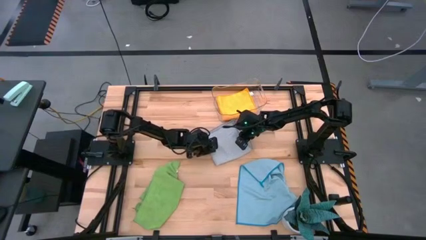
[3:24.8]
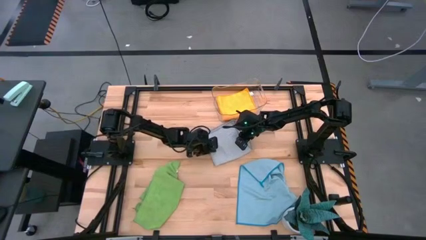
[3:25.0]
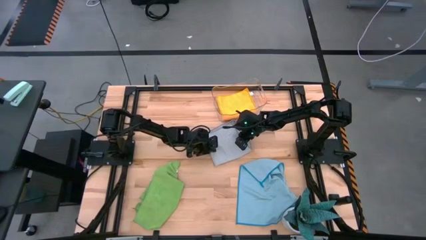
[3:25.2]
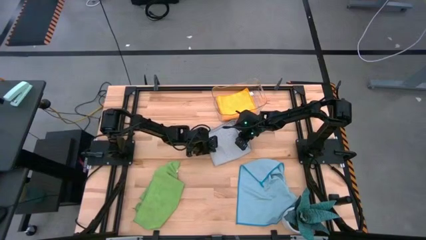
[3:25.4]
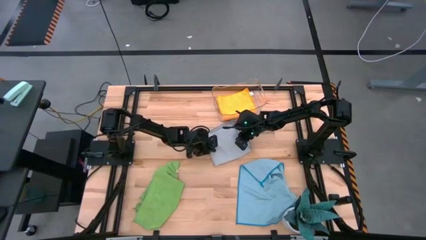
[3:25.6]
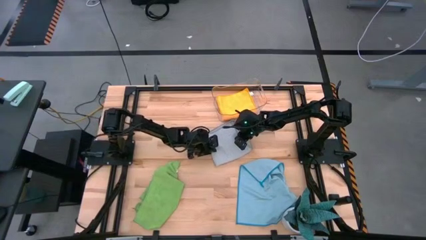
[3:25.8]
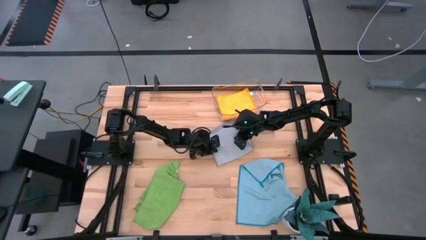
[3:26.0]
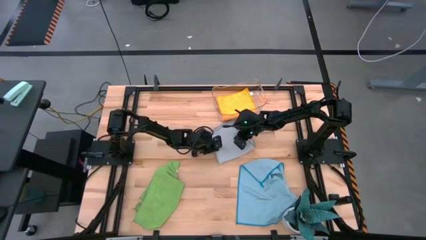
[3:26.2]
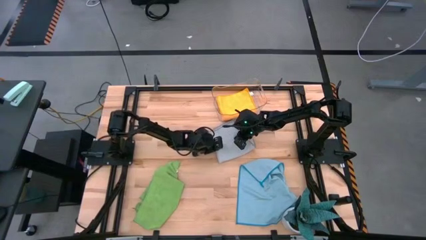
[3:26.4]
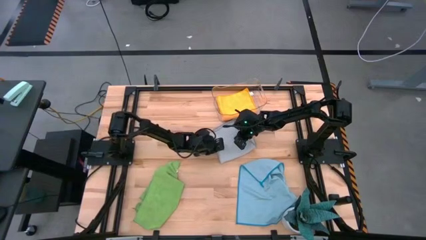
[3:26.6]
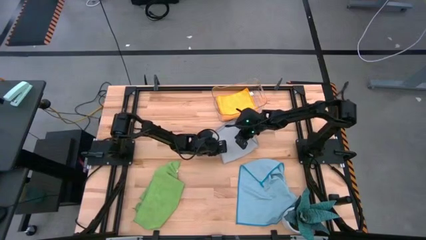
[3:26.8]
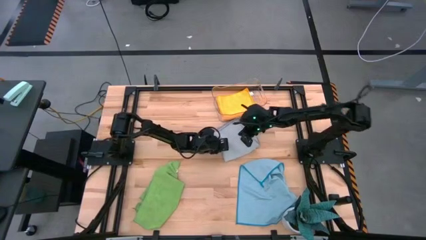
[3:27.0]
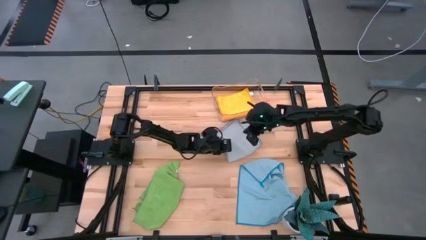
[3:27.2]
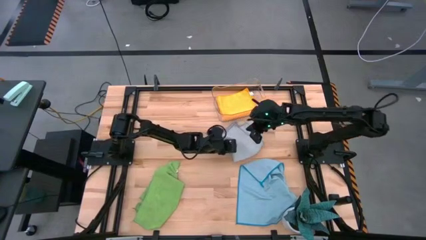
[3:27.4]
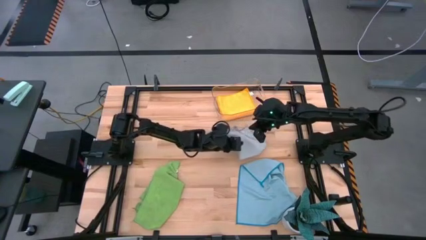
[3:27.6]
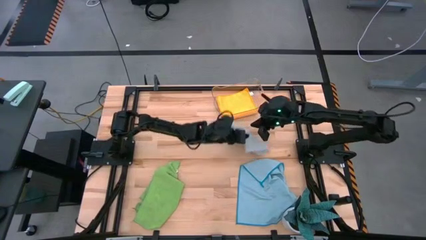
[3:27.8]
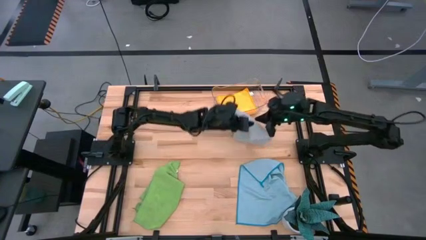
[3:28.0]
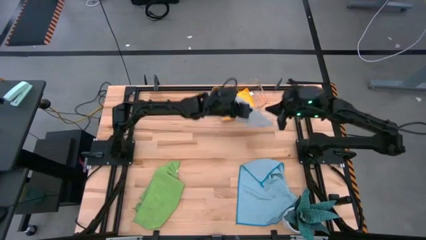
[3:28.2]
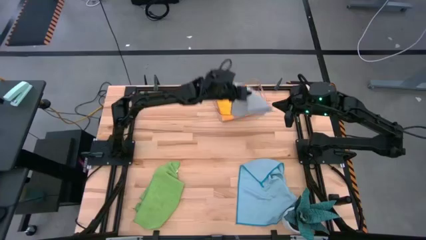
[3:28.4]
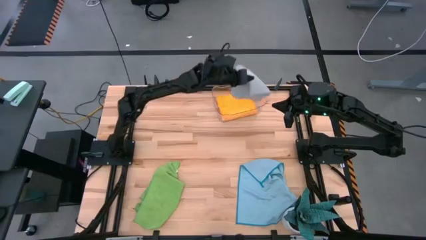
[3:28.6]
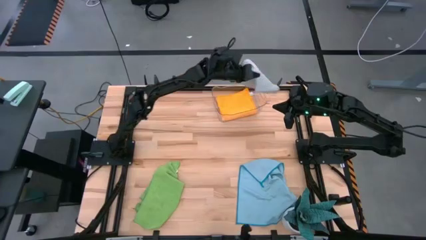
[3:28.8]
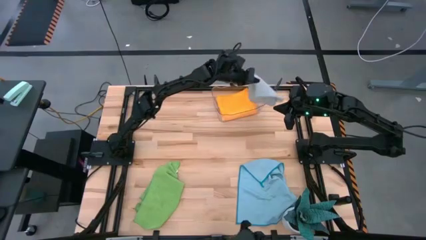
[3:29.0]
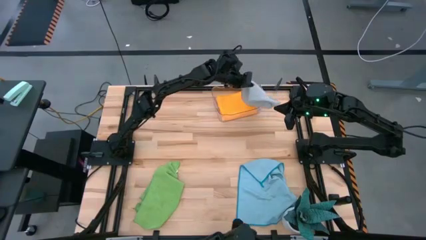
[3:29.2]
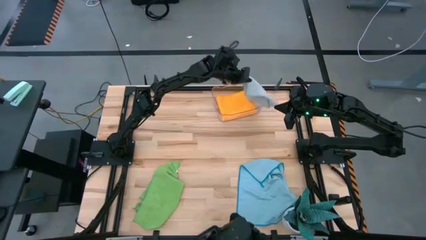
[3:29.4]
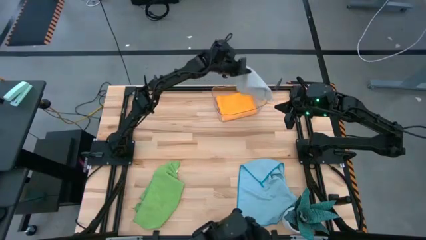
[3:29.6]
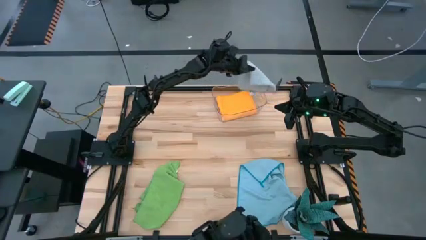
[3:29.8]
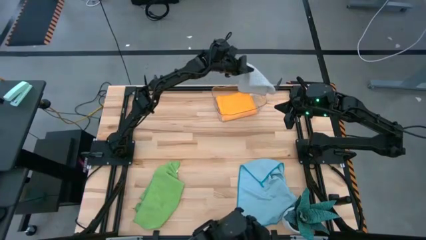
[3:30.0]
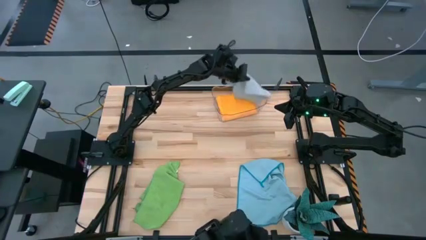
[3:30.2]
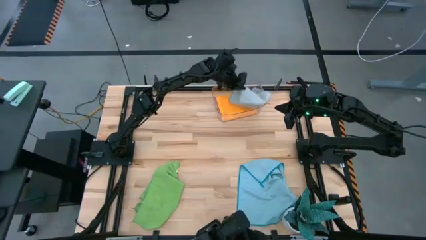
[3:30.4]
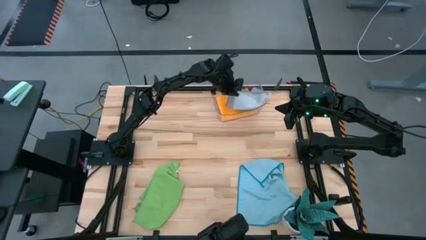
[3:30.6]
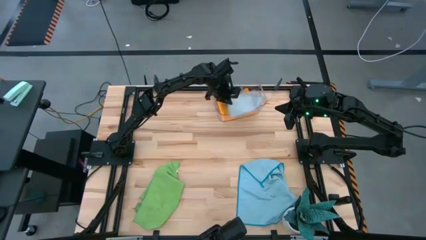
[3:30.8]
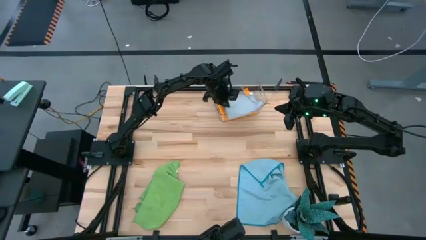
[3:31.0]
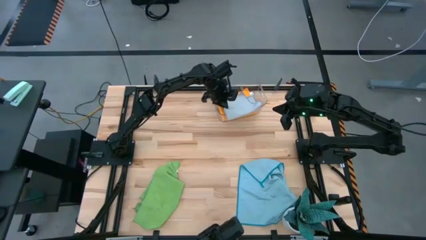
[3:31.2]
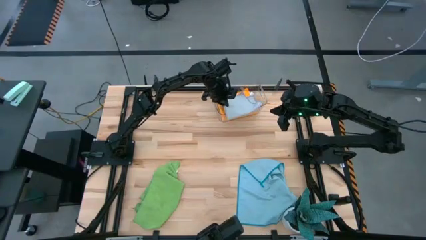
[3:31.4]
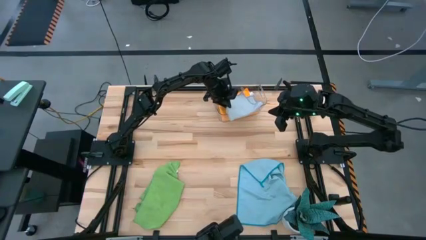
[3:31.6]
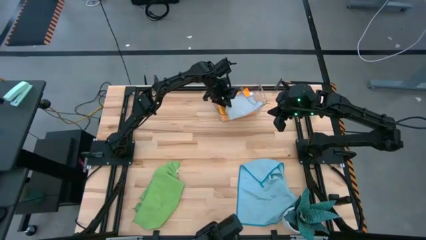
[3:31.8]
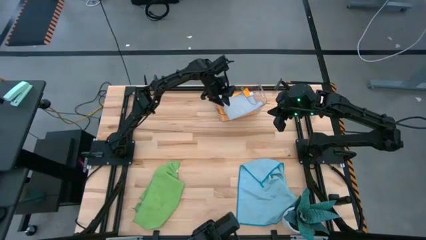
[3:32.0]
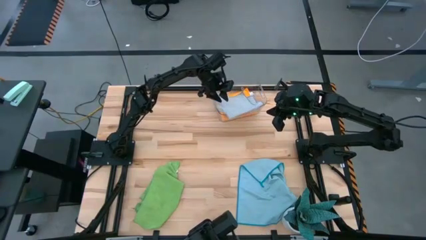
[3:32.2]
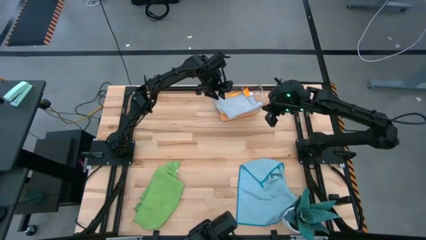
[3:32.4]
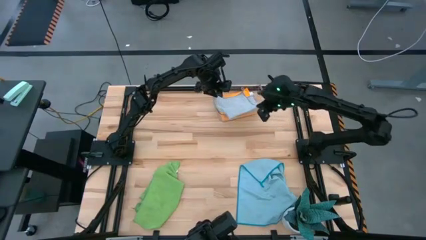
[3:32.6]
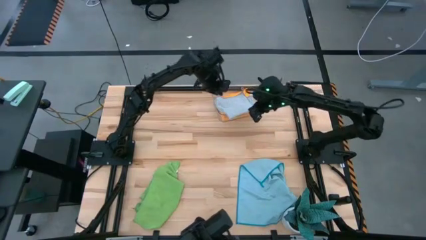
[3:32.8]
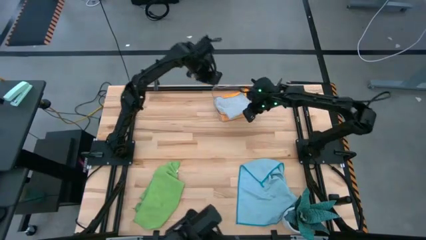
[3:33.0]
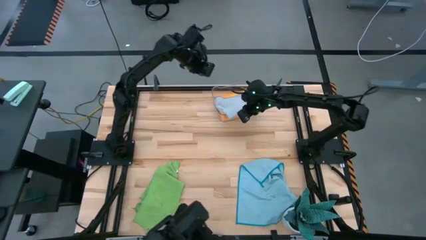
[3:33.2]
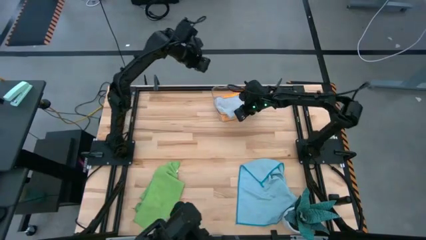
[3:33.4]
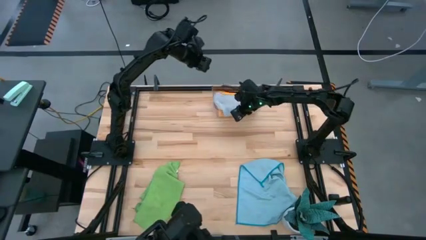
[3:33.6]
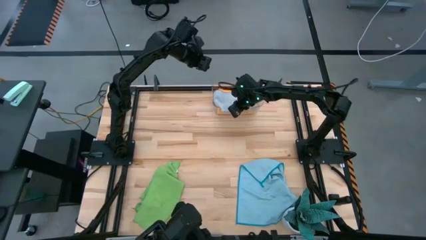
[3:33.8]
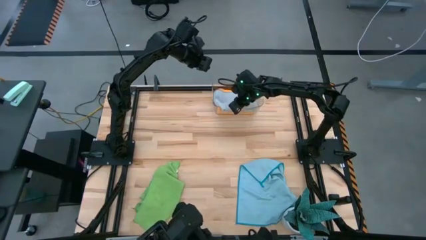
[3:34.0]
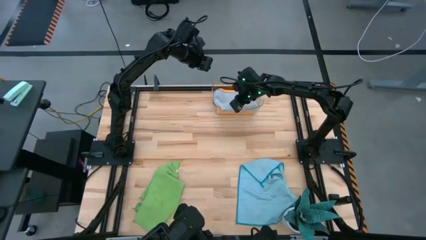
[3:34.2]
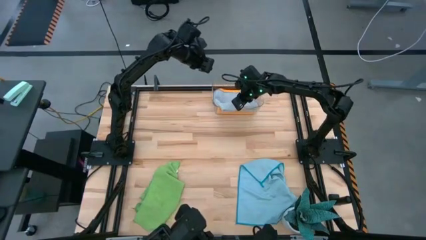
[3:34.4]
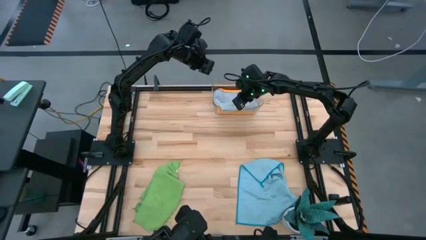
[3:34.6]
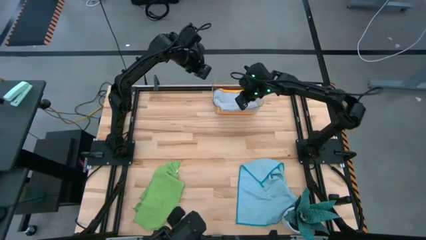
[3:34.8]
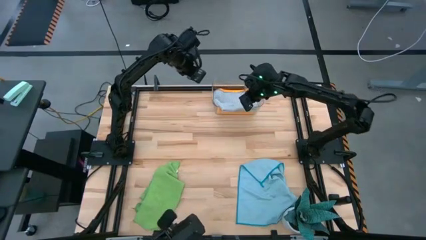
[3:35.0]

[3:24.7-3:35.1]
Task: Fold microfiber towels
Put the gray microfiber cloth into the transparent bin

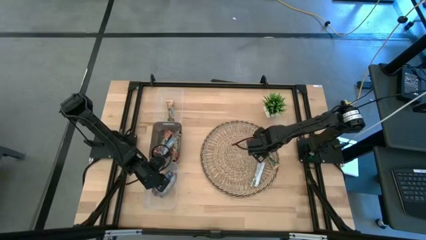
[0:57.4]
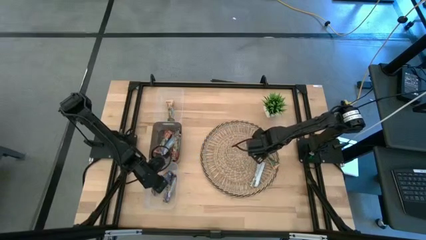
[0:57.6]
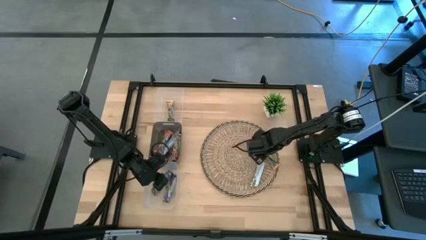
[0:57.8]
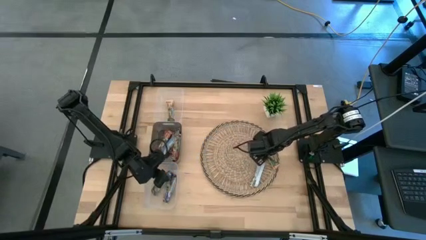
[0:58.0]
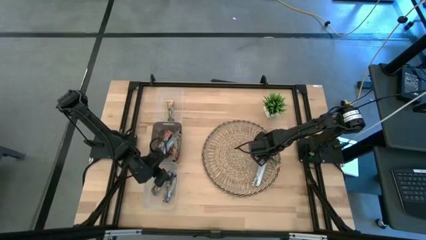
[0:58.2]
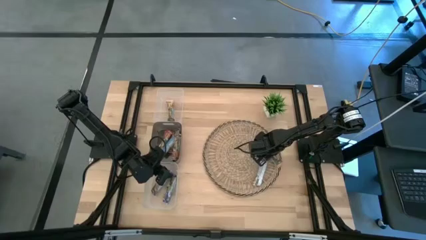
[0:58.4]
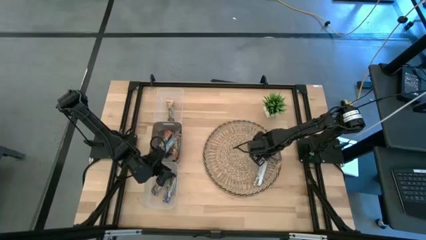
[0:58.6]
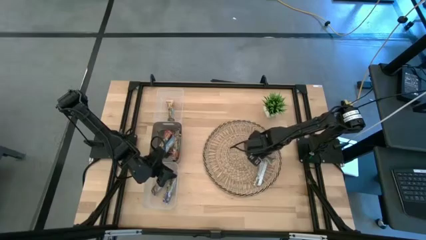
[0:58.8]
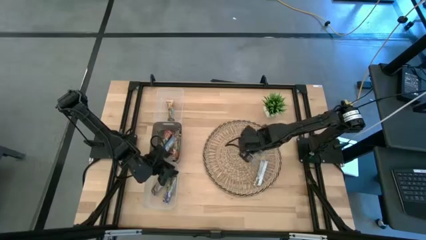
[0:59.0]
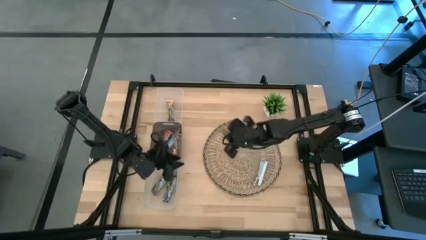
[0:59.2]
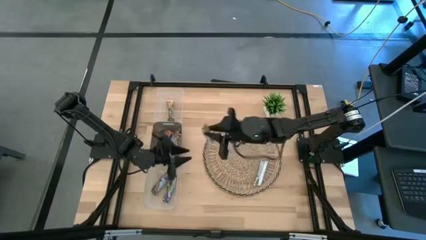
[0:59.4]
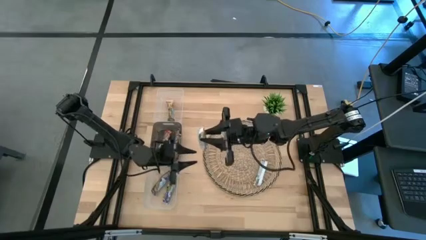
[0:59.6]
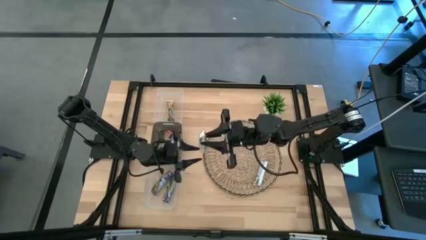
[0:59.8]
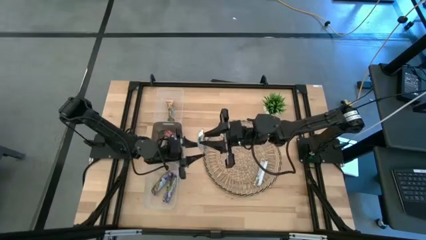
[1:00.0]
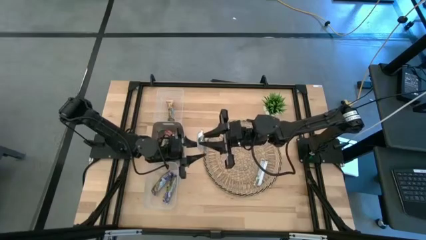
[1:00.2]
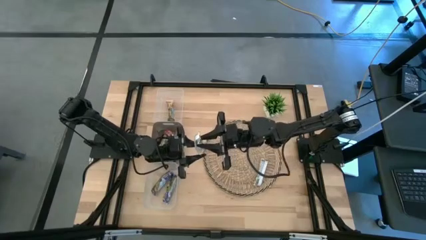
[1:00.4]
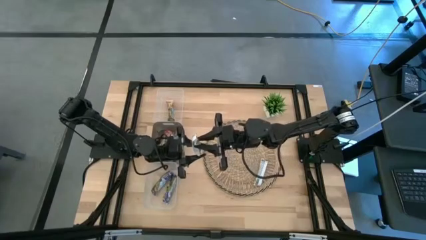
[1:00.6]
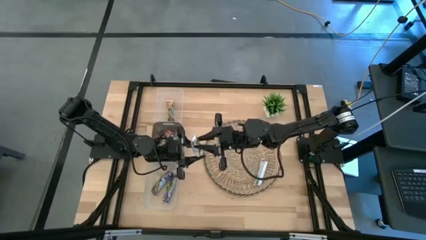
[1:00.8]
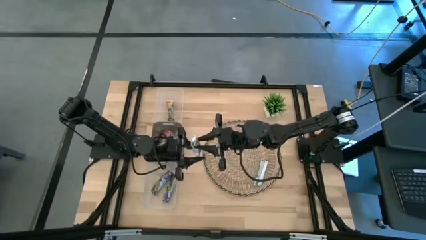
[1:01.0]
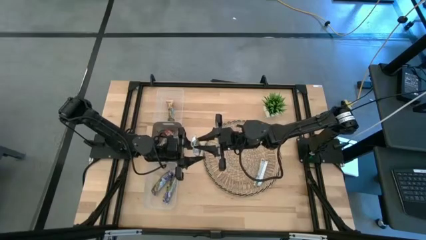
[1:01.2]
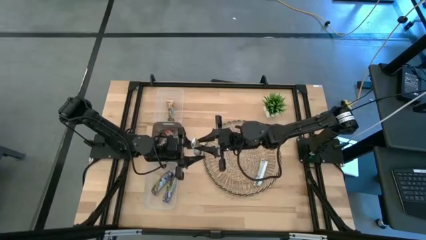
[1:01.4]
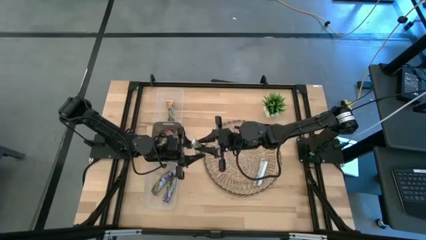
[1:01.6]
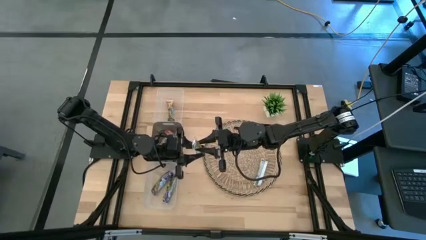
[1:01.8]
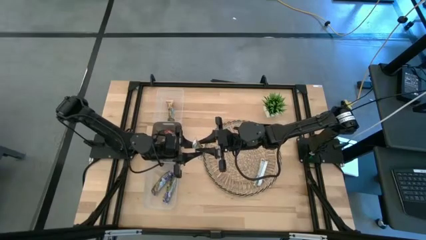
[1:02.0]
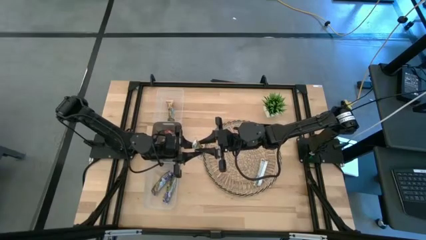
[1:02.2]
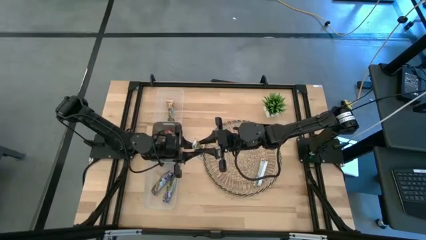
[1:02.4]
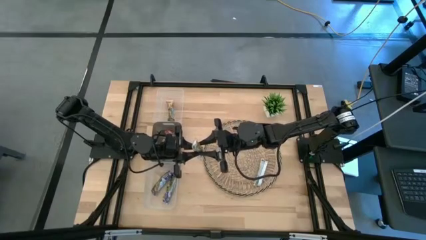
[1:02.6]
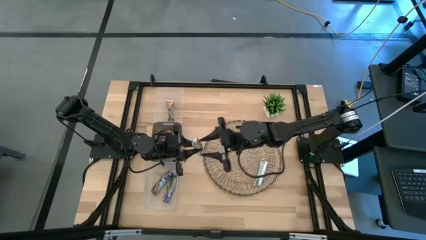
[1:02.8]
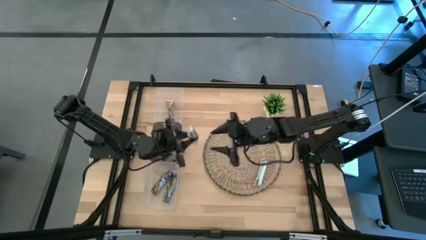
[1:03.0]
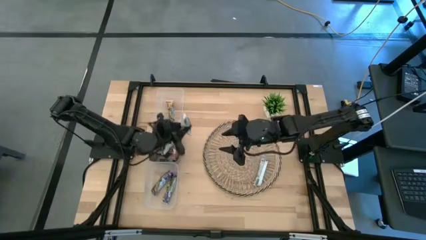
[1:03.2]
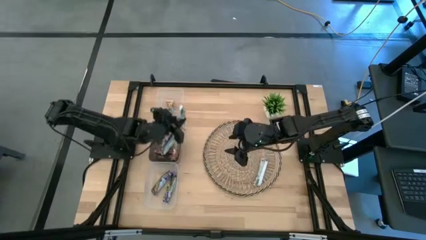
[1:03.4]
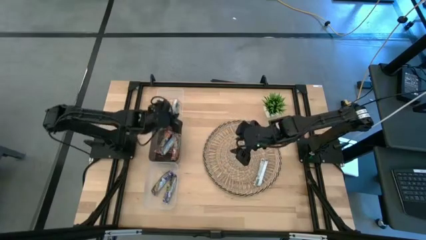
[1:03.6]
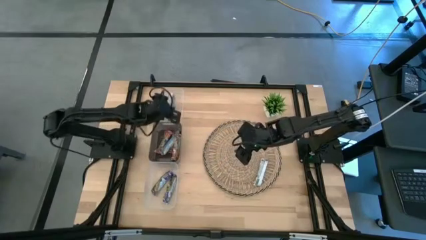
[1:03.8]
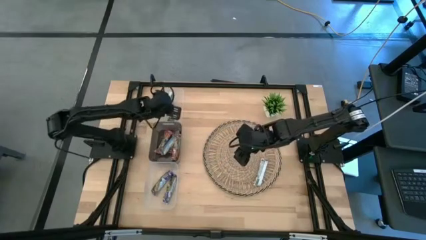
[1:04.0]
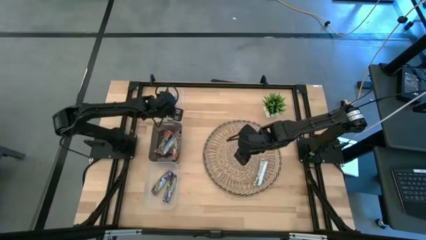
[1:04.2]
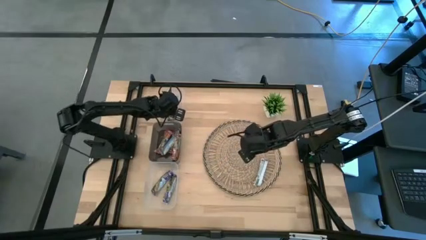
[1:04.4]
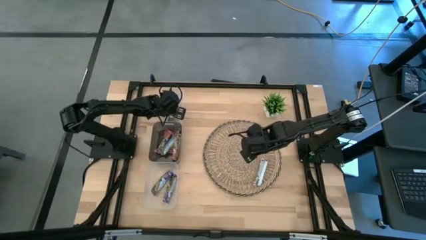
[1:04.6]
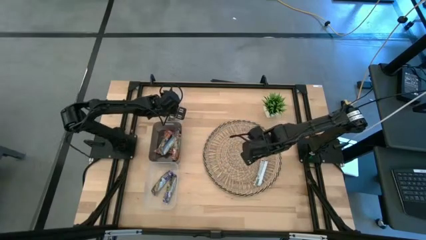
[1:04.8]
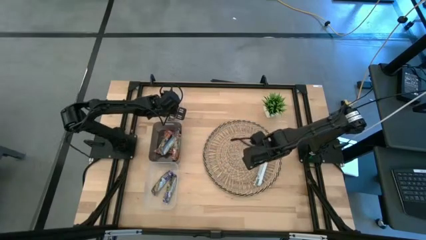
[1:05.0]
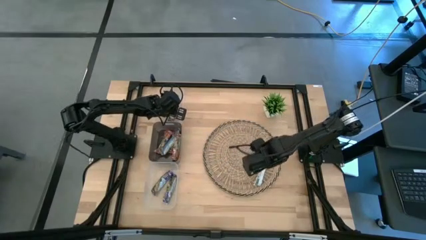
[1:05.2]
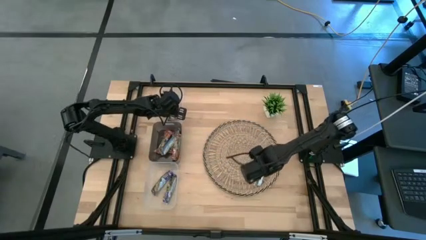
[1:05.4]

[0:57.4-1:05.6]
Task: Pick and place Granola Bars by type
Put the yellow granola bar into the top transparent bin
